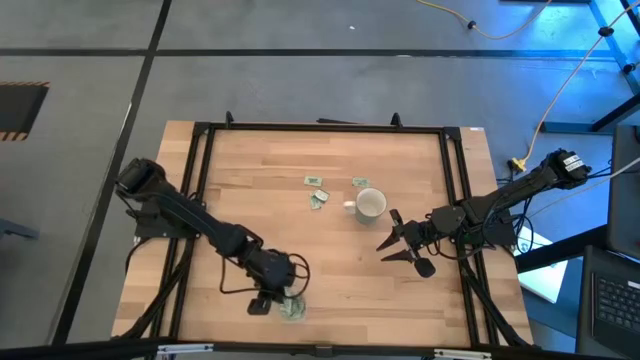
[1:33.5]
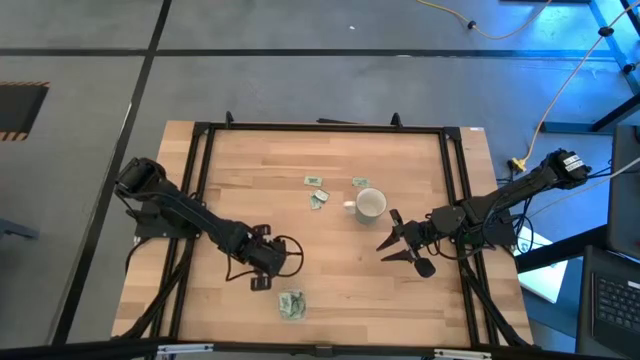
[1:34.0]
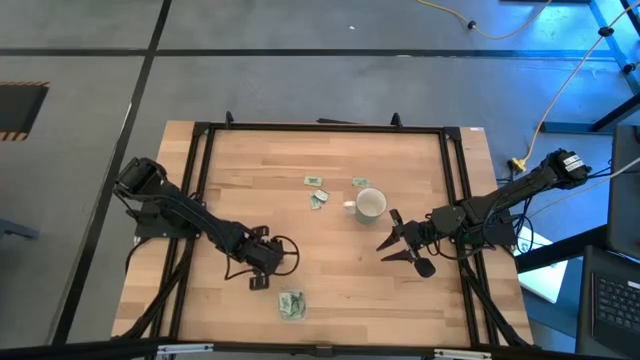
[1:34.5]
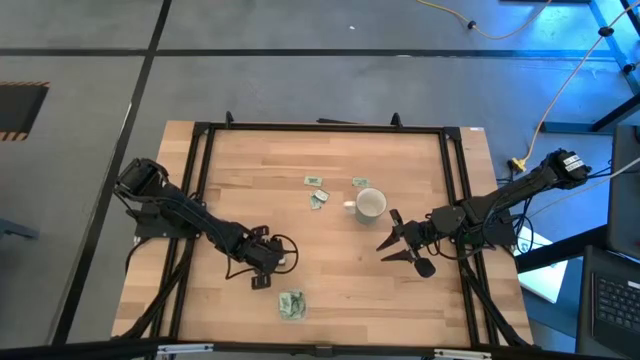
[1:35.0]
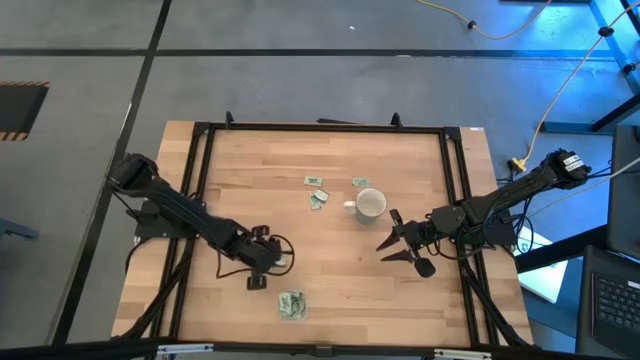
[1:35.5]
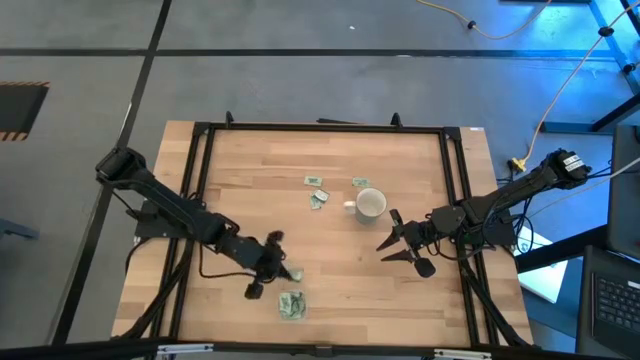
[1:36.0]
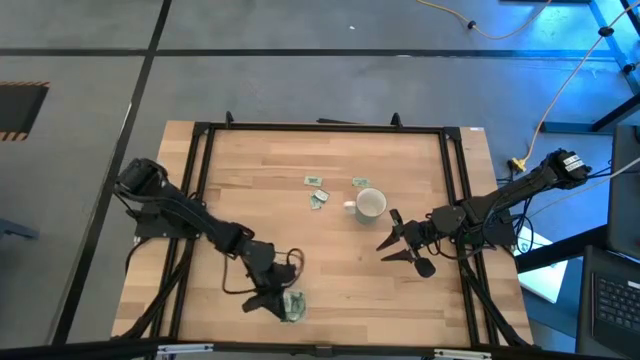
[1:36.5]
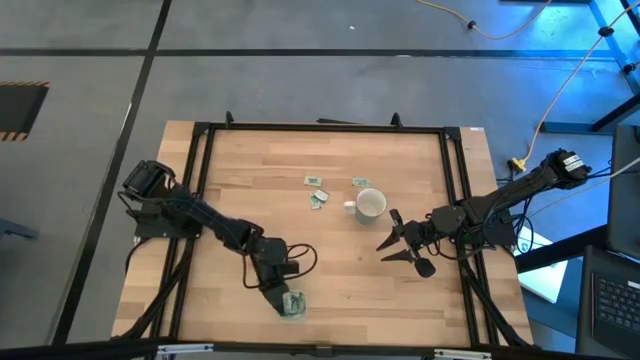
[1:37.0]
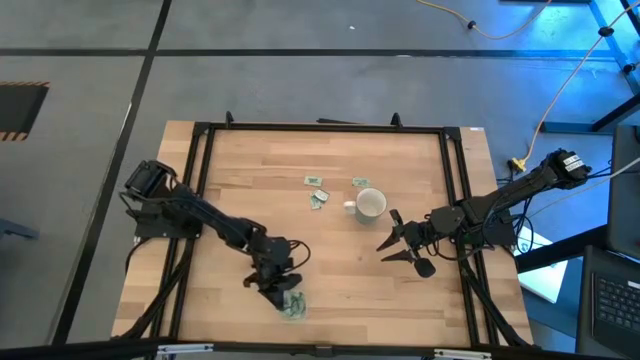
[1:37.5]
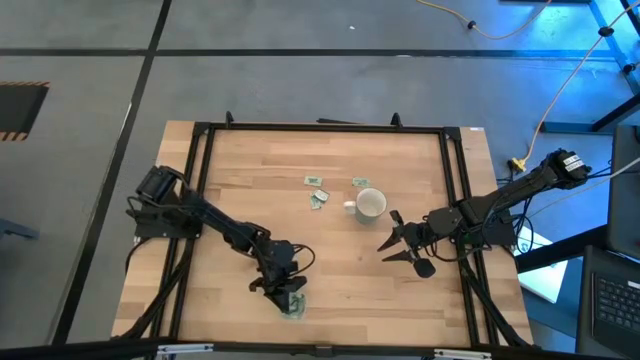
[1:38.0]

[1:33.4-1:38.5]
Task: Pick and place Stevia / Truvia into bins
Put the bottom green stevia packet into the transparent bin

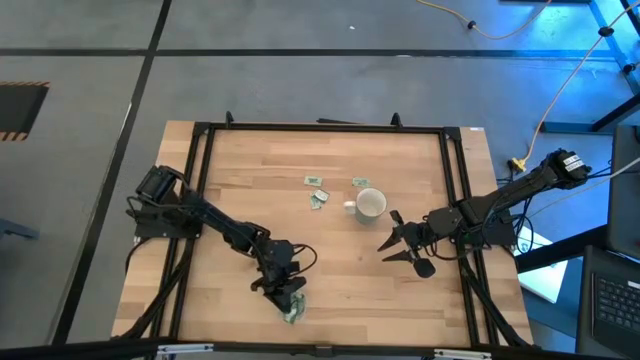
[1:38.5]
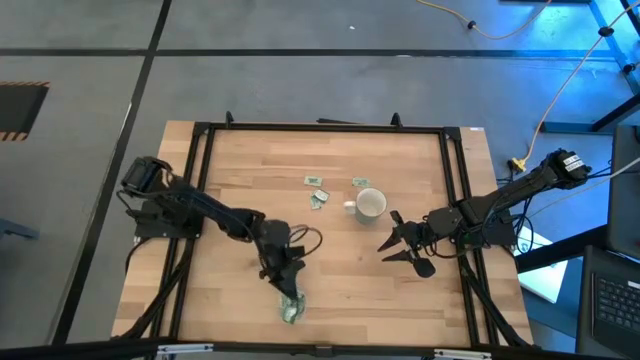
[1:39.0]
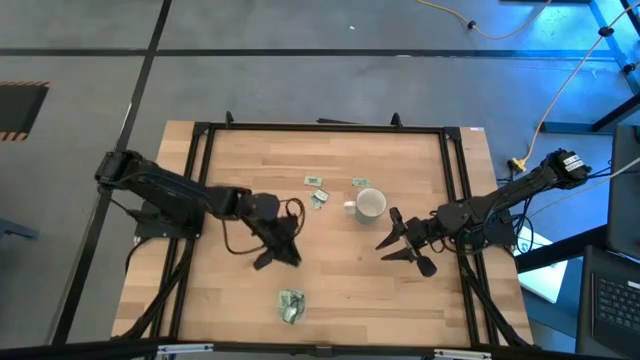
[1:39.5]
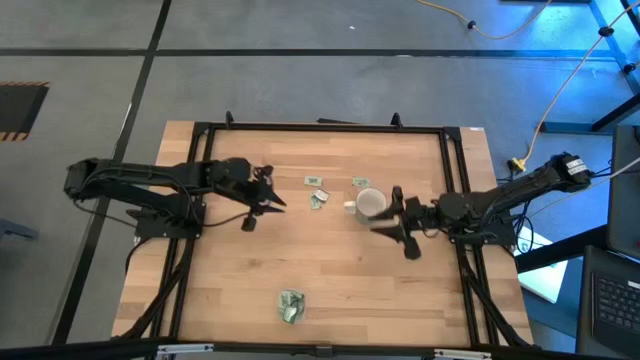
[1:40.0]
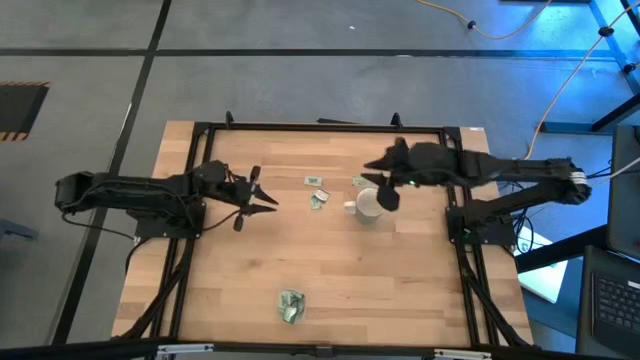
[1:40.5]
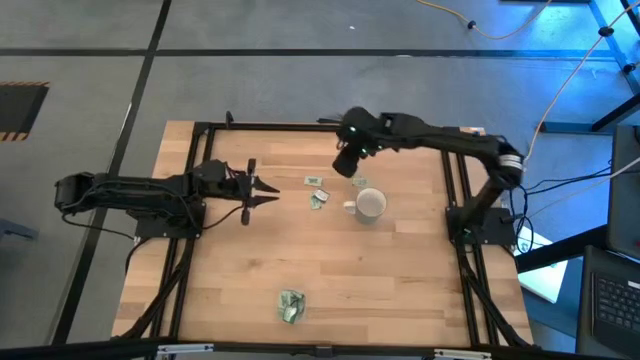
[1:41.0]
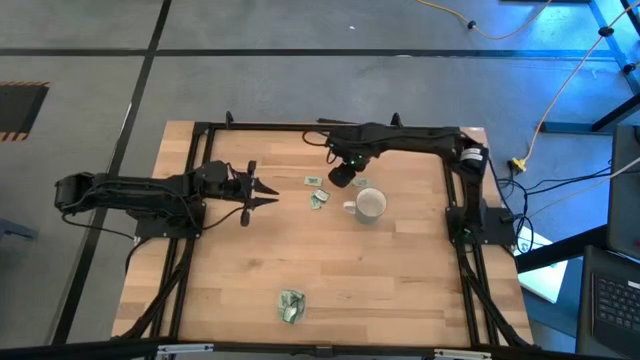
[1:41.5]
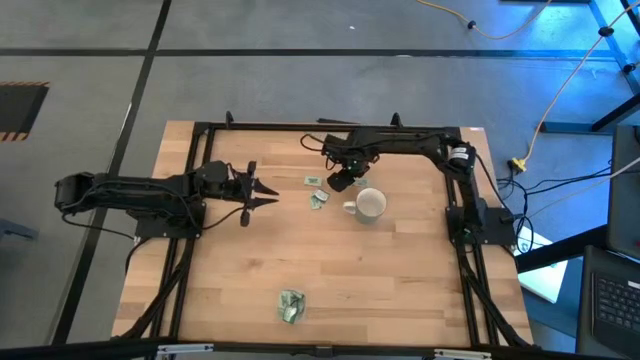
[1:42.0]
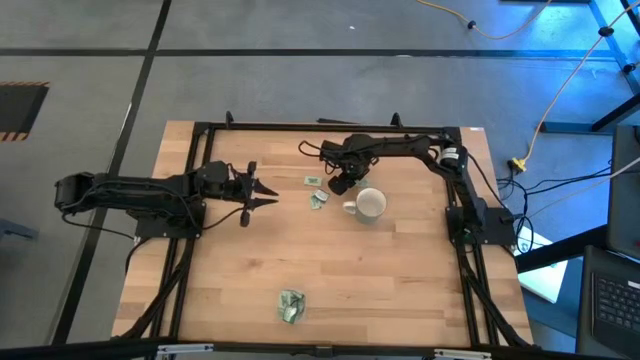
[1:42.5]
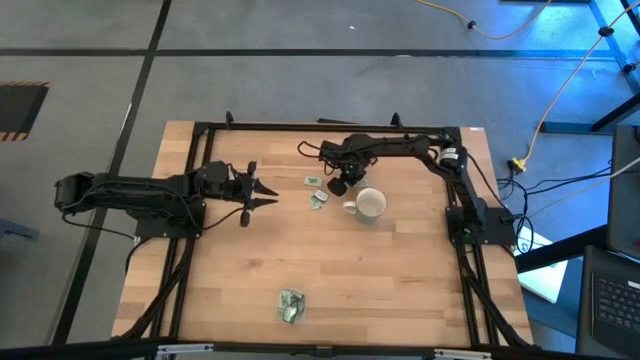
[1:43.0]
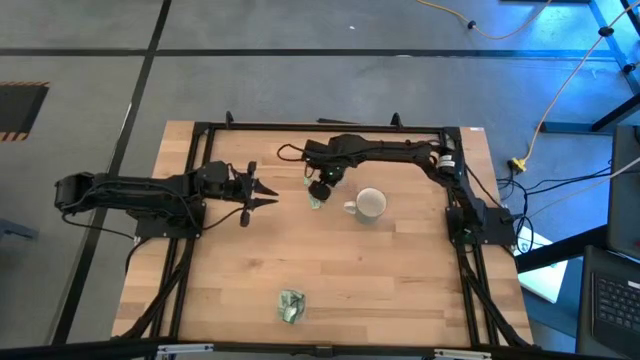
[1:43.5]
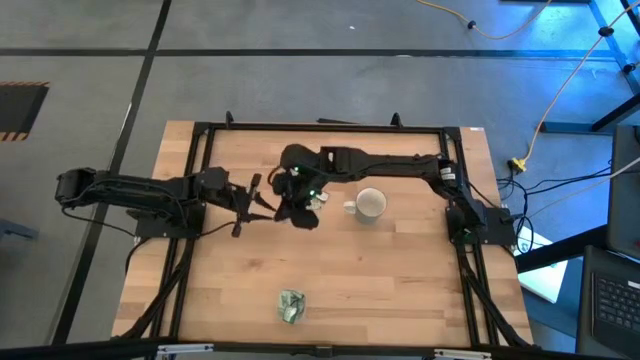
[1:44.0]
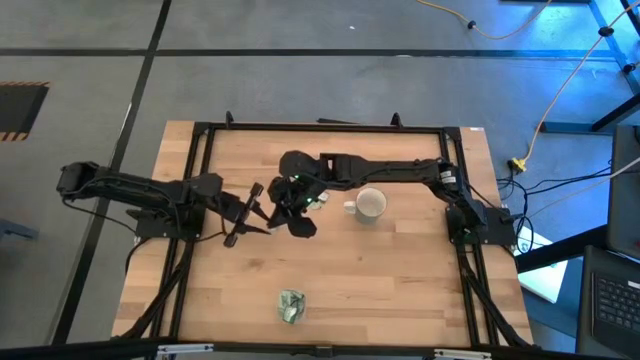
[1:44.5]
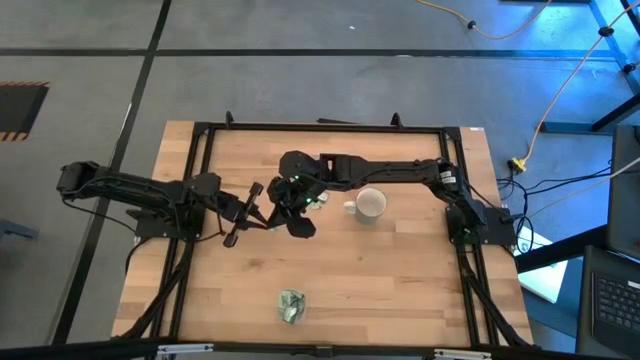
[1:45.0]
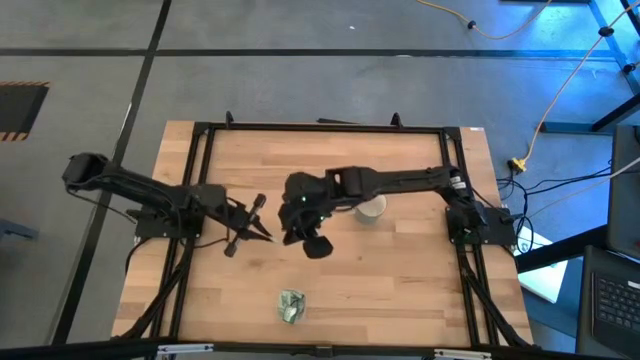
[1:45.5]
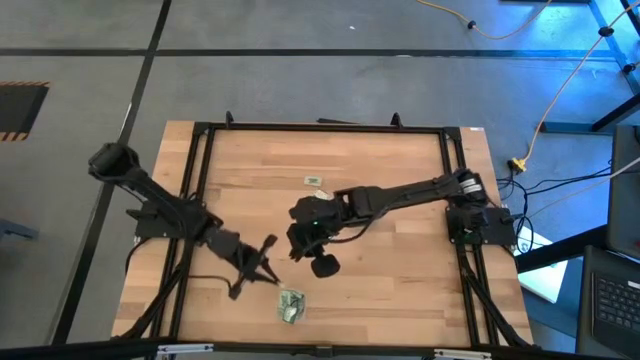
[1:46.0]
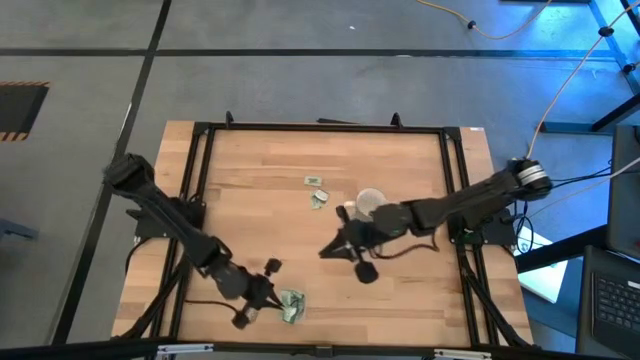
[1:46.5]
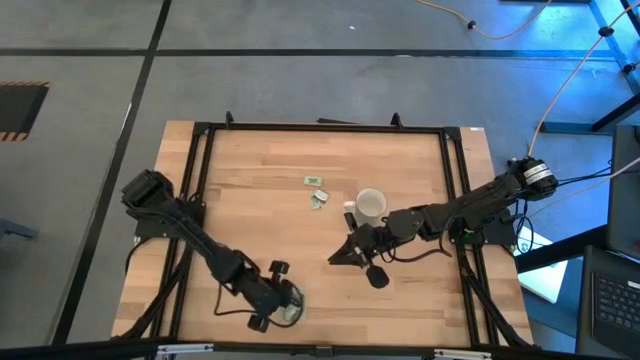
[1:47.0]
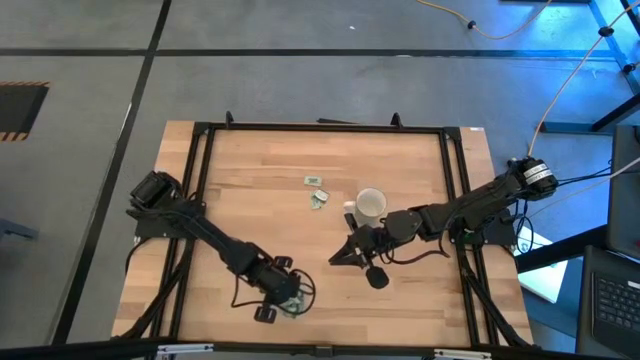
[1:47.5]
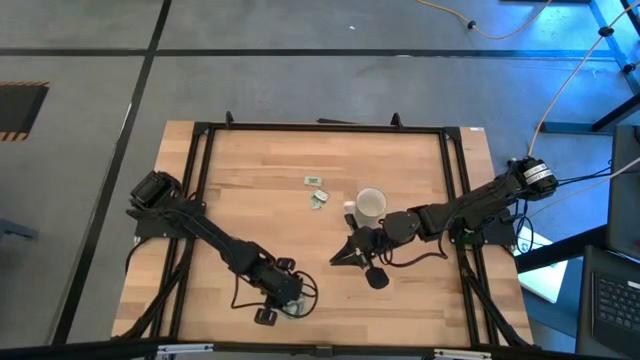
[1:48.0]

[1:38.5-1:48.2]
Put the top right light green stevia packet into the transparent bin

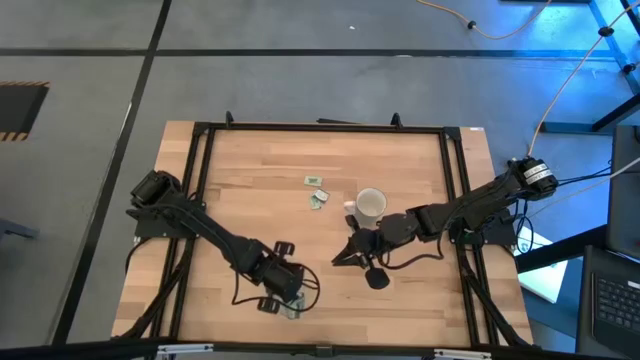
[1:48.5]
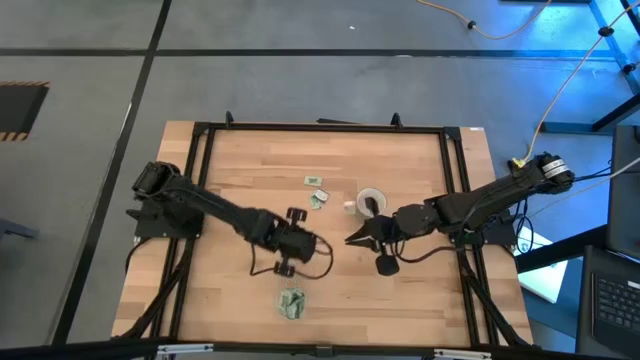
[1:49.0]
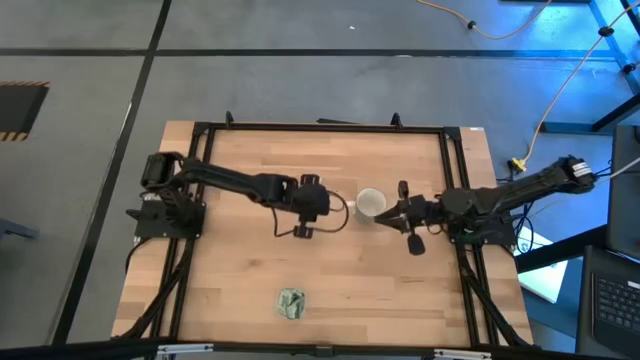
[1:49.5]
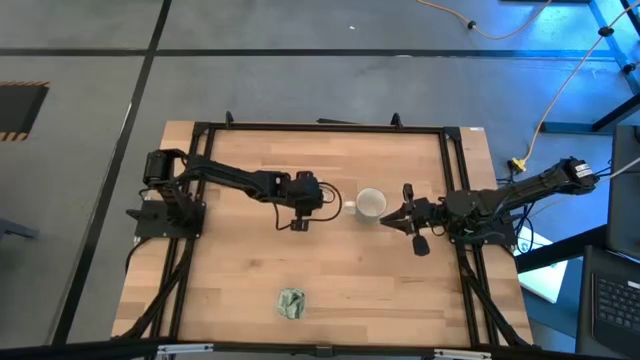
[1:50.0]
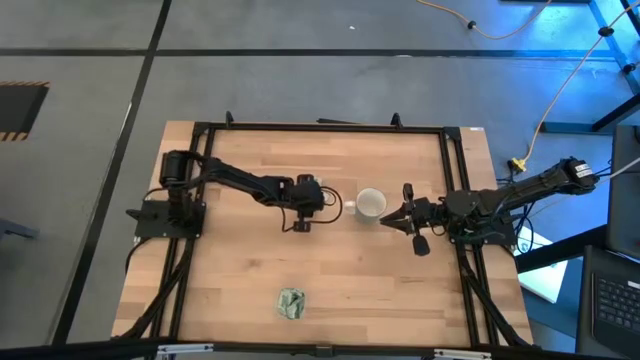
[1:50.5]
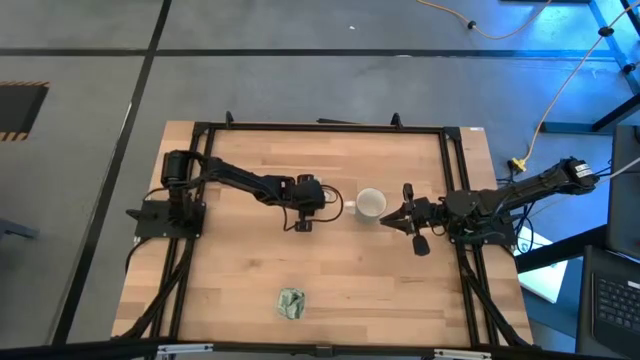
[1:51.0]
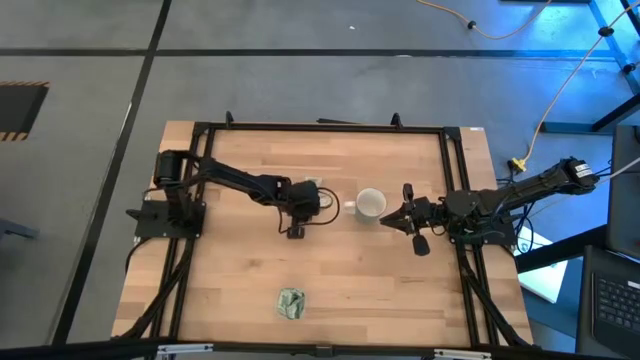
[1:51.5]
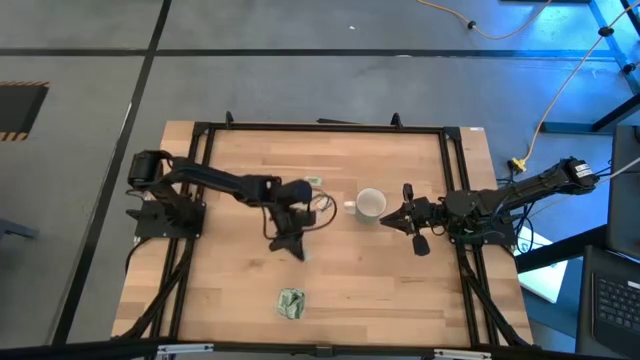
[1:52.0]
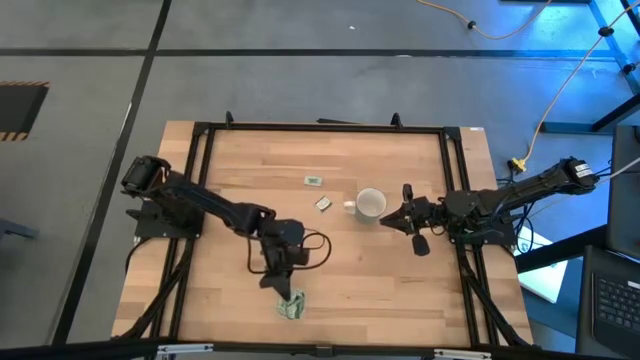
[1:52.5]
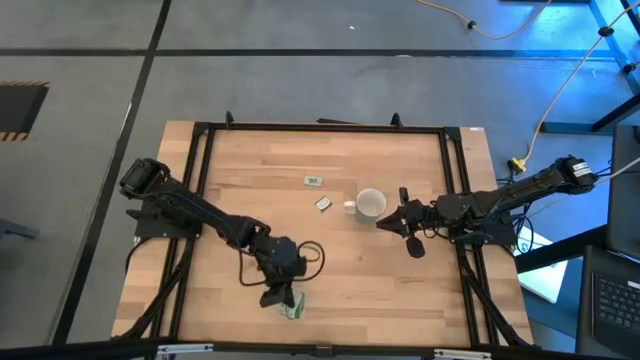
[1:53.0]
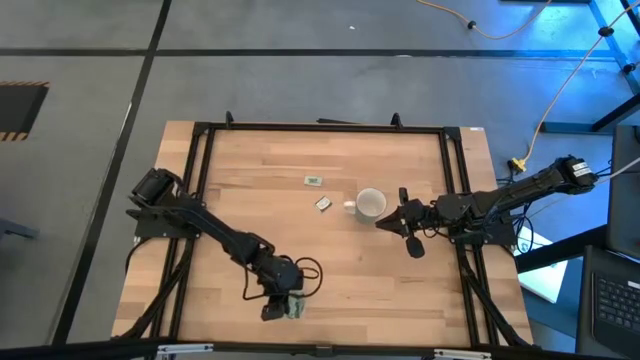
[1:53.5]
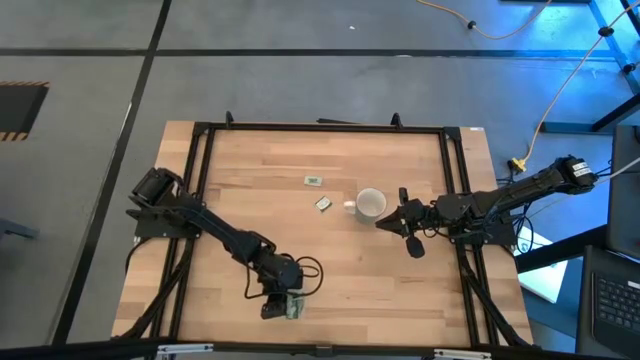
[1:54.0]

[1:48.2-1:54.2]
Put the bottom light green stevia packet into the transparent bin
